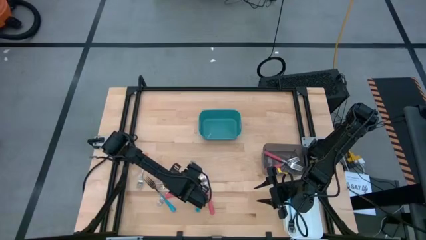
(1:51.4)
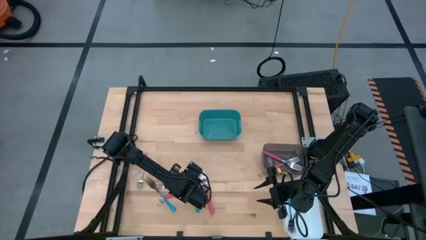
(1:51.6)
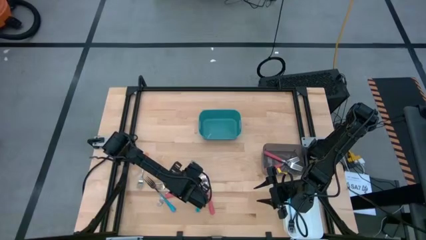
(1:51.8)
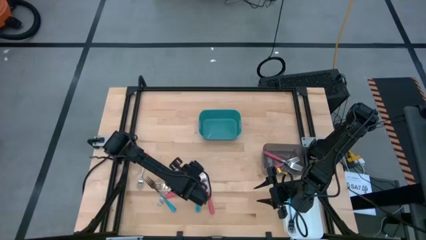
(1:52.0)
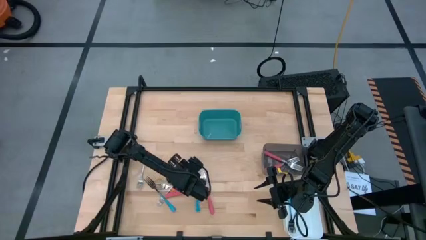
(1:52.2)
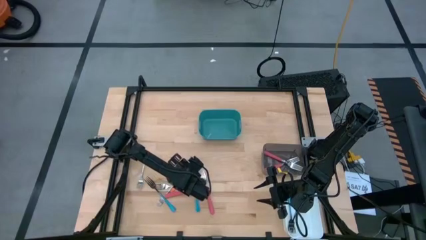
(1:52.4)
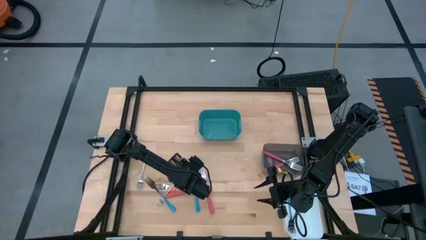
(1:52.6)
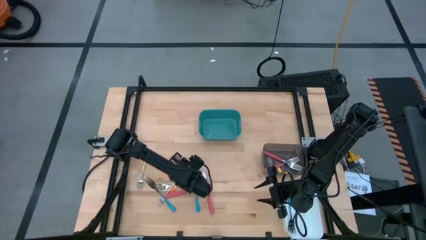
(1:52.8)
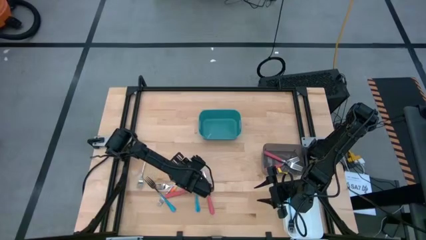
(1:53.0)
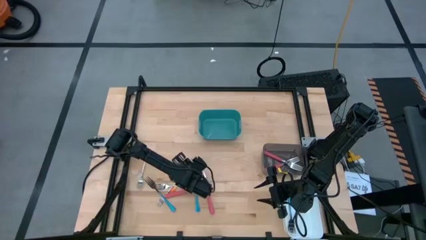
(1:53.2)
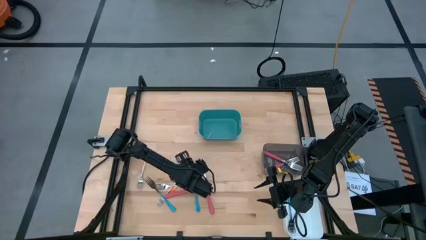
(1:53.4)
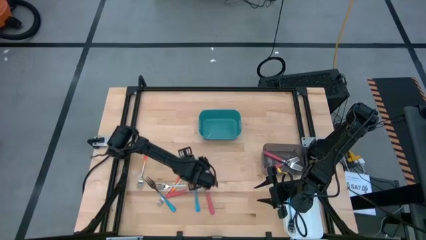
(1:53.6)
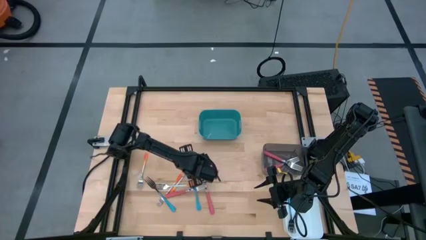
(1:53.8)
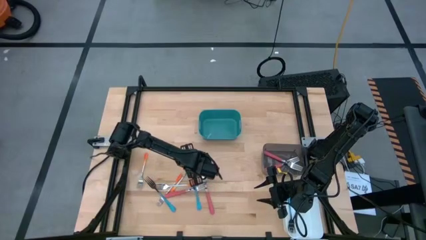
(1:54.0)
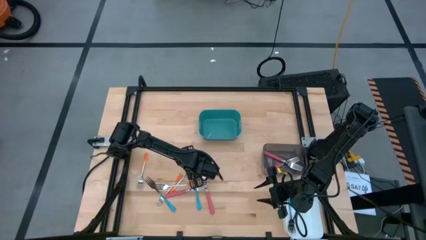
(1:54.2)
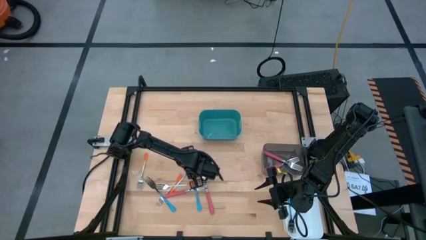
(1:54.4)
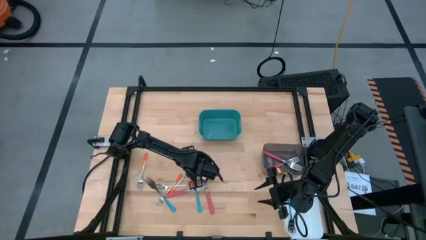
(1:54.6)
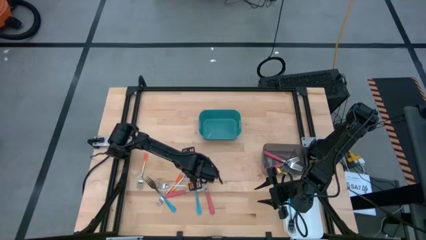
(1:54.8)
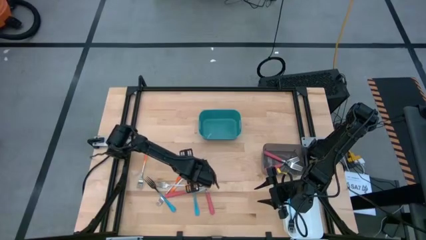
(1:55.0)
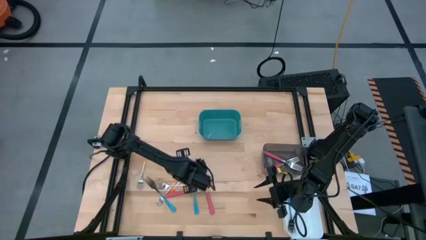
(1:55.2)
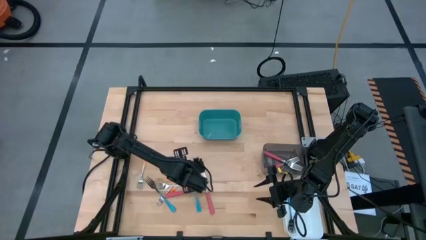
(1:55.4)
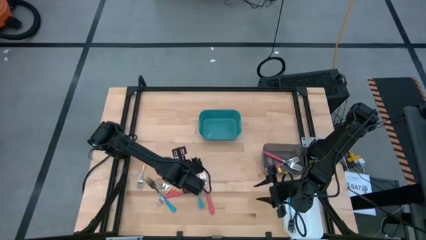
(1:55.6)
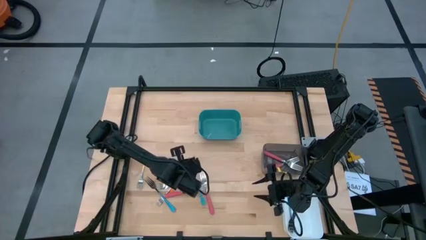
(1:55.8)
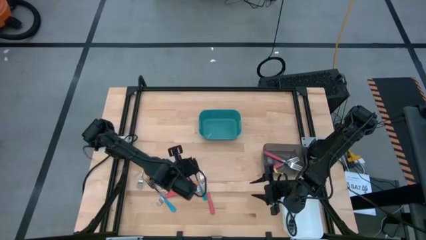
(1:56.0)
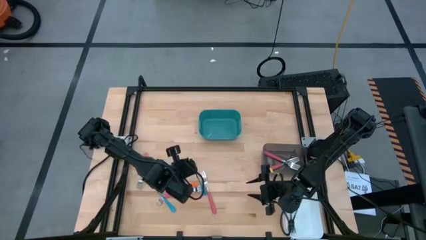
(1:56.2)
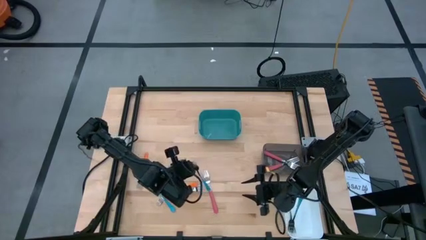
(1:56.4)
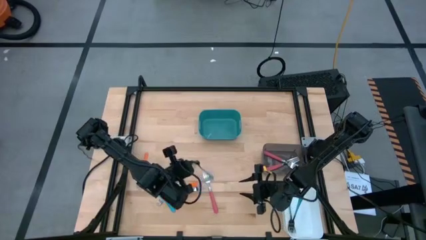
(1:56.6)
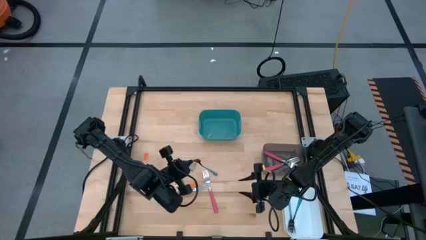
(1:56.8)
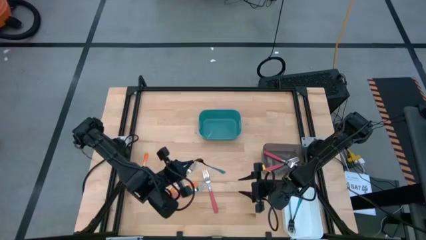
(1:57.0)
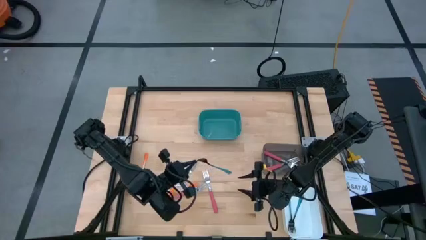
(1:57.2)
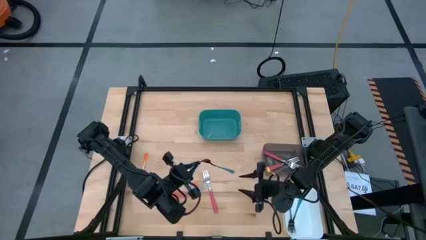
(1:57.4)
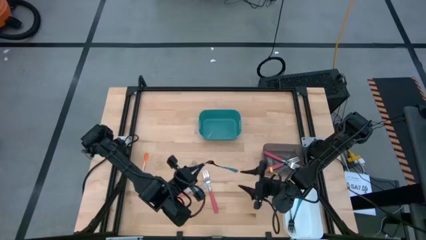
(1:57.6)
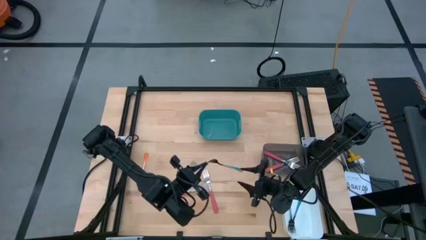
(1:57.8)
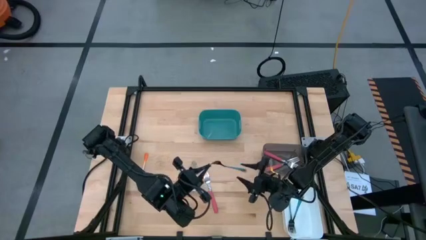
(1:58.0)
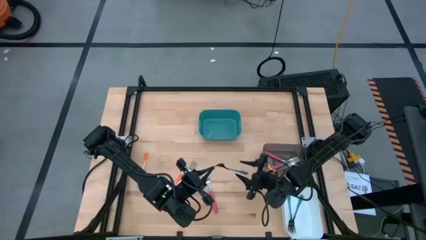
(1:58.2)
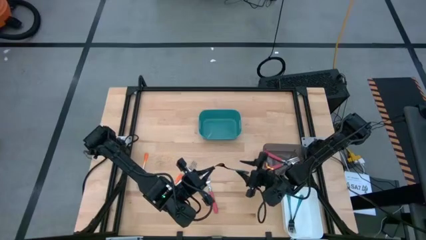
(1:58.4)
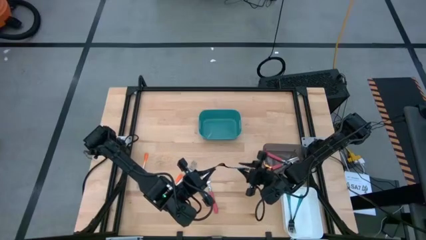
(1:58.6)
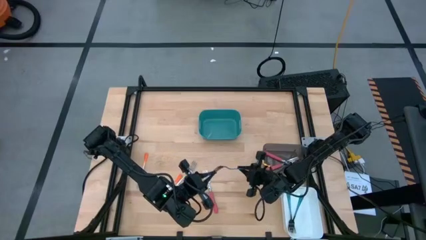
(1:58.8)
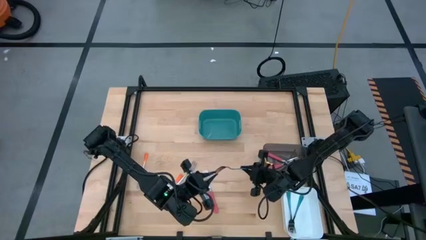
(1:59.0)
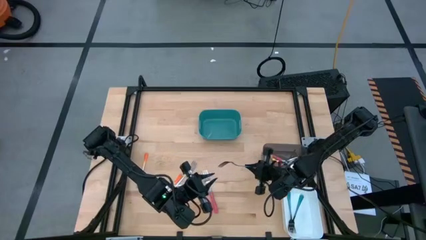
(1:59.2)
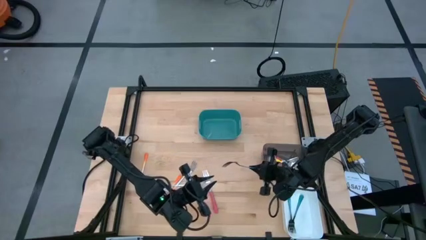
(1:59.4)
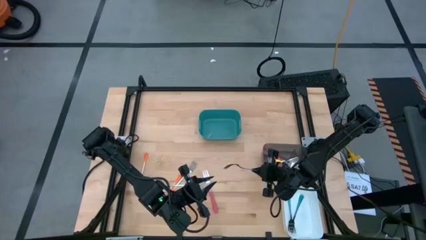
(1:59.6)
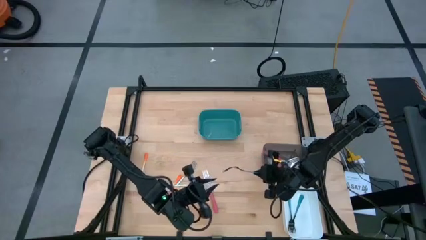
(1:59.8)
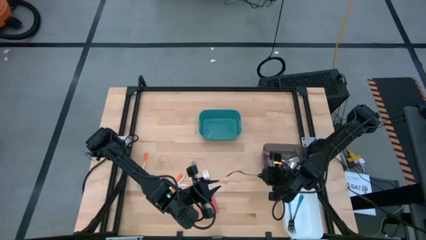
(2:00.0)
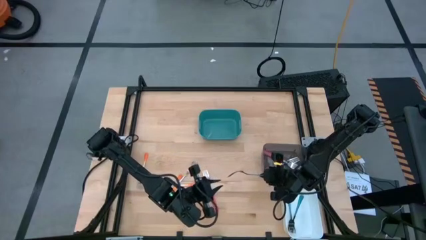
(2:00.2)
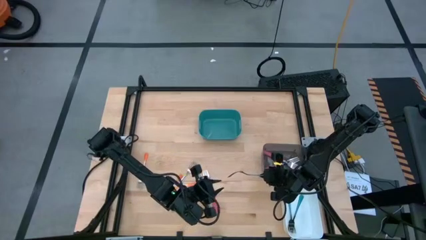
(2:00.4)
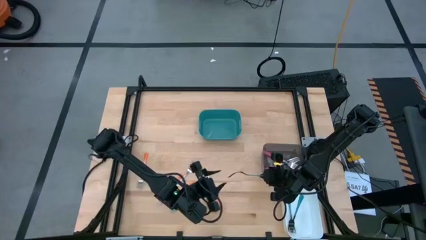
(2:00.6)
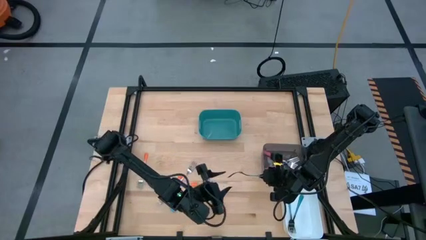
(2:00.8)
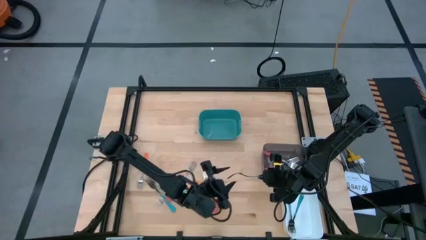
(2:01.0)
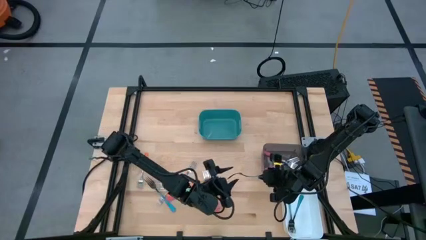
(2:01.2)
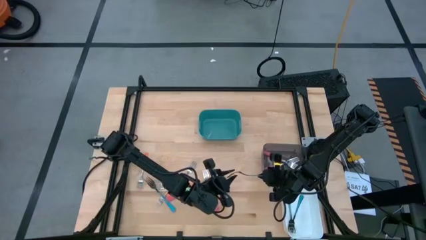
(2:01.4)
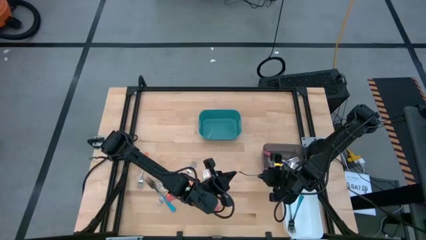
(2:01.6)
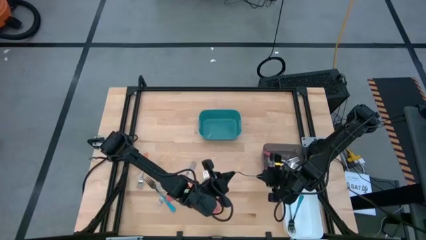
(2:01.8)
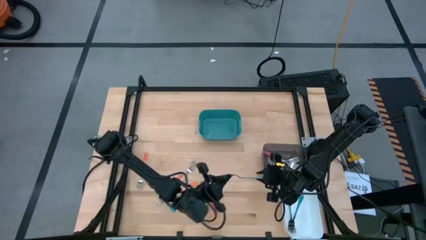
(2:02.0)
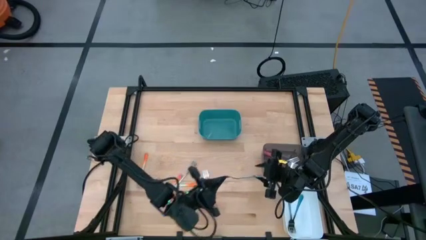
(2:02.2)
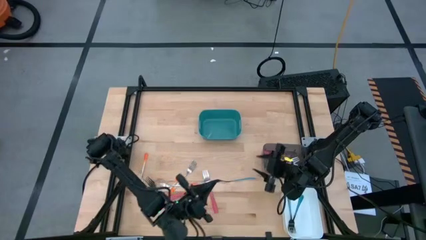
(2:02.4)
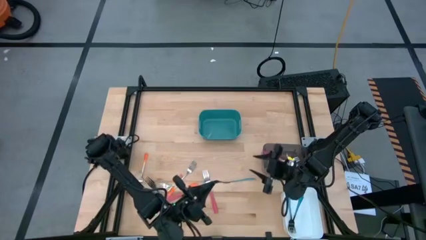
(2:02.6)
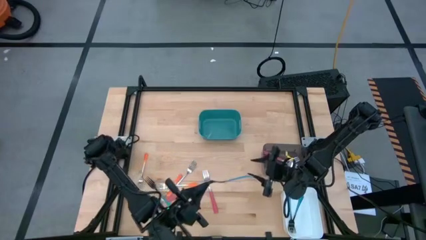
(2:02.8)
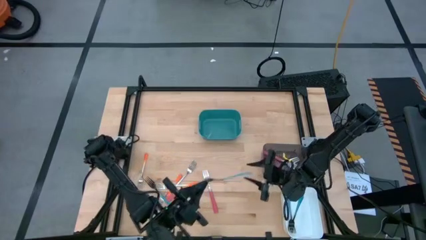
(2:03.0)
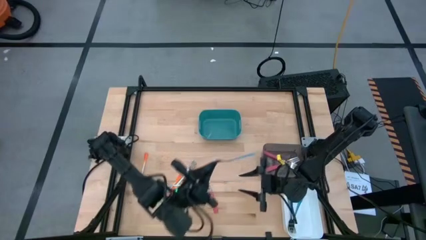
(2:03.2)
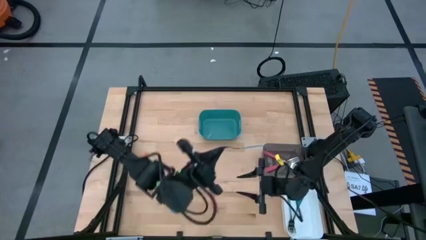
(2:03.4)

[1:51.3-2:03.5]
Task: Sort silverware by color (type)
Put the blue fork into the white bin

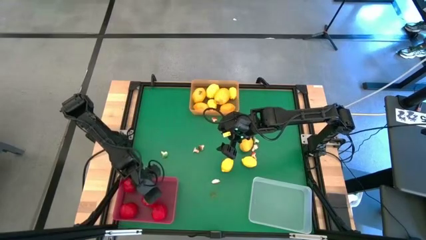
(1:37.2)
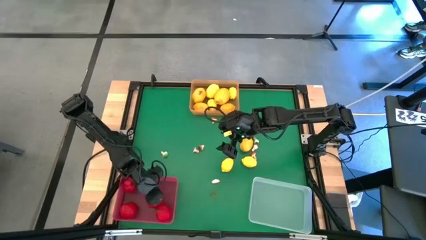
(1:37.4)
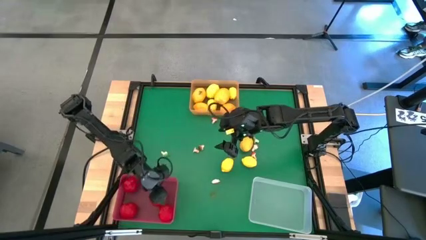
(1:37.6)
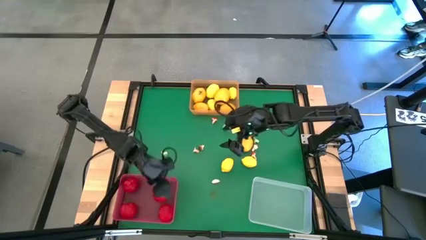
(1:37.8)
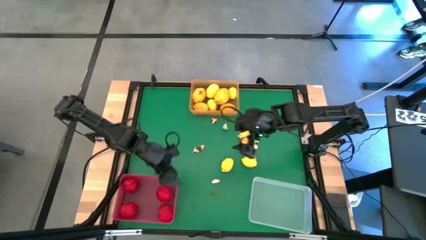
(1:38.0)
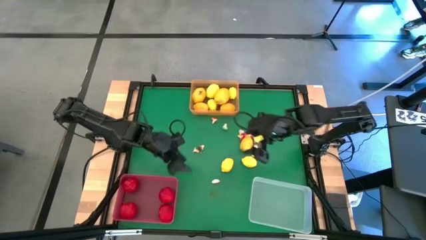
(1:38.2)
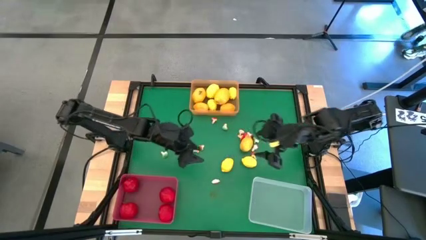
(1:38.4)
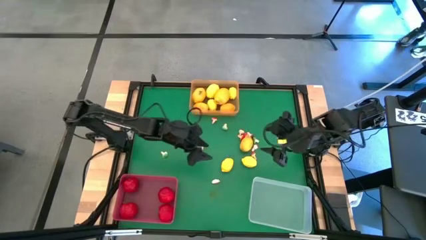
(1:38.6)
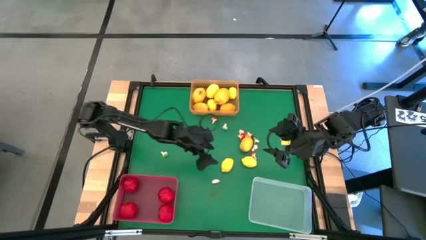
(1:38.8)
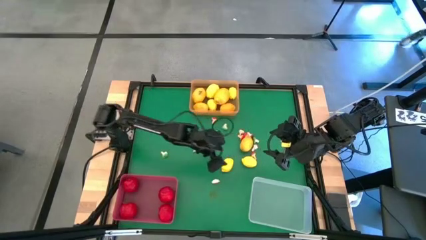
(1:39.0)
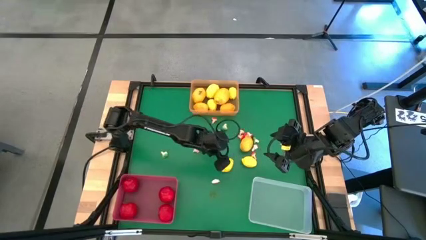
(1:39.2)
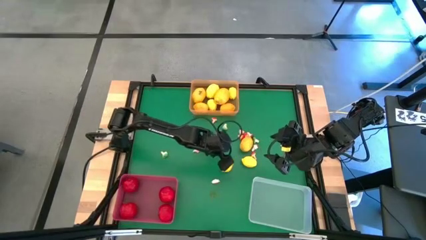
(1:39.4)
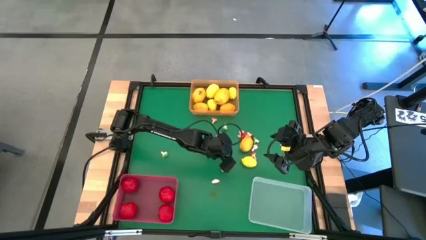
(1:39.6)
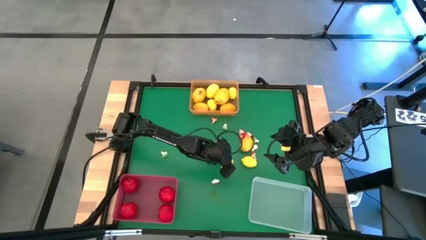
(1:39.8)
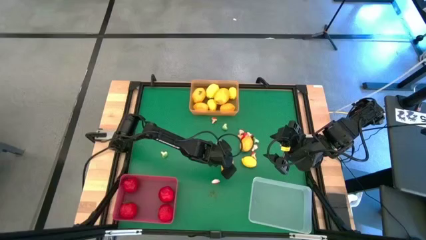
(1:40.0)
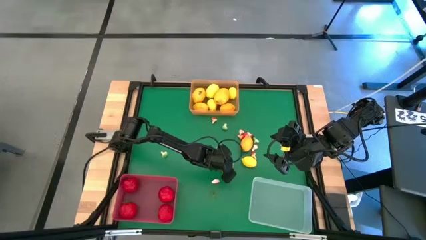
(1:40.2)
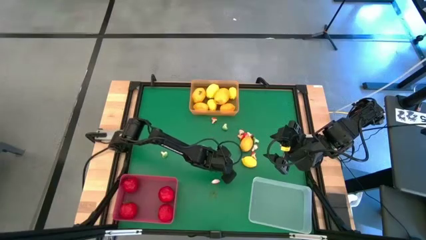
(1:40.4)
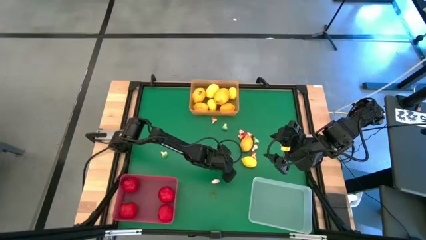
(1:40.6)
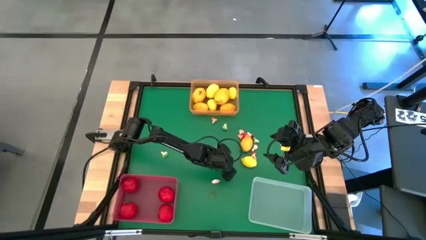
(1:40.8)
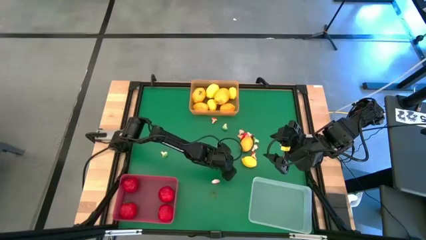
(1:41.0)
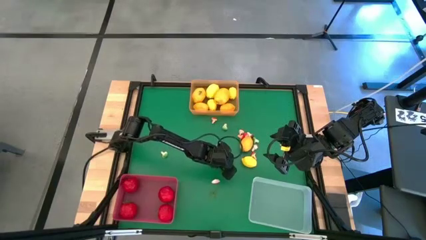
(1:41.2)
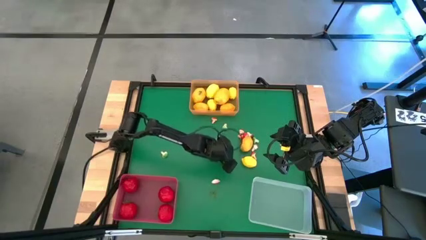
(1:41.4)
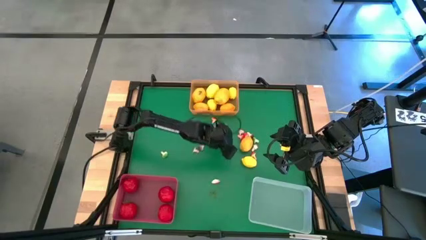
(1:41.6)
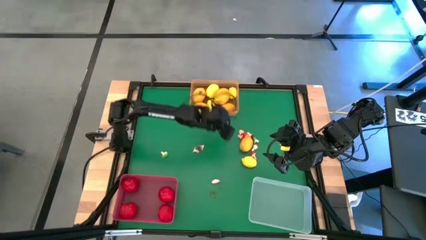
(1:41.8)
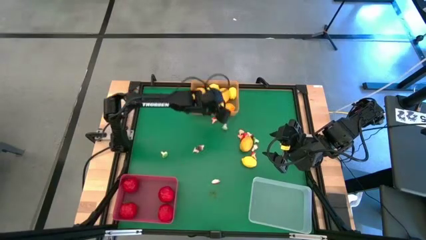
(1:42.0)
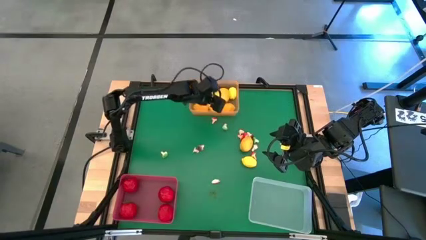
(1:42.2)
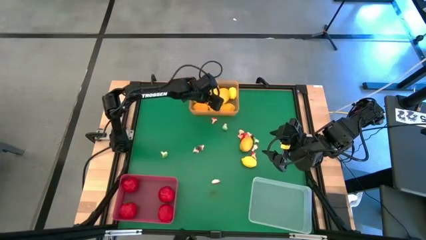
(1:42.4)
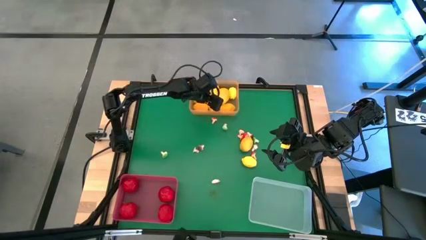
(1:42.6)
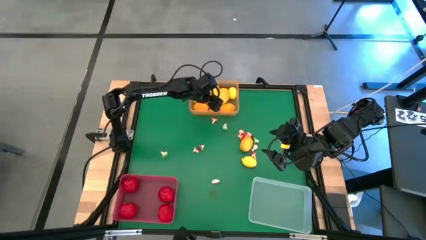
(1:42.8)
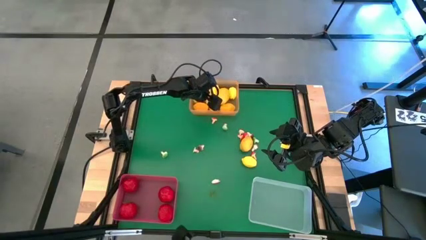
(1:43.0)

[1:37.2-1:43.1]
Task: Sort produce into baskets
Put the lemon into the orange bin
